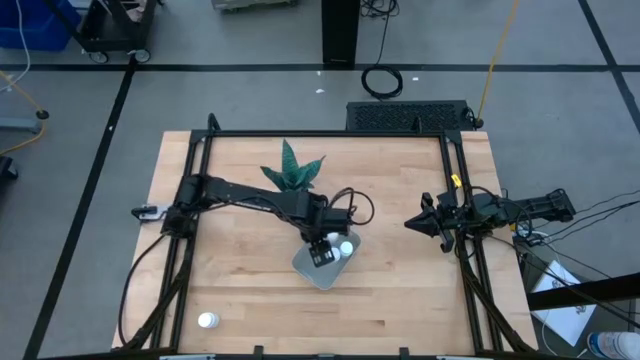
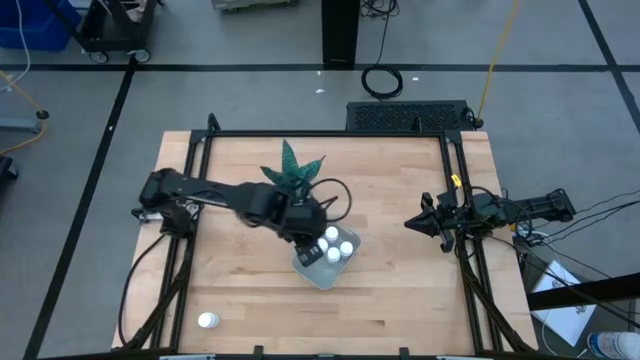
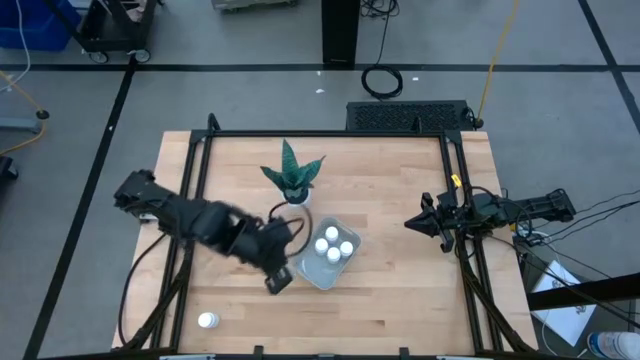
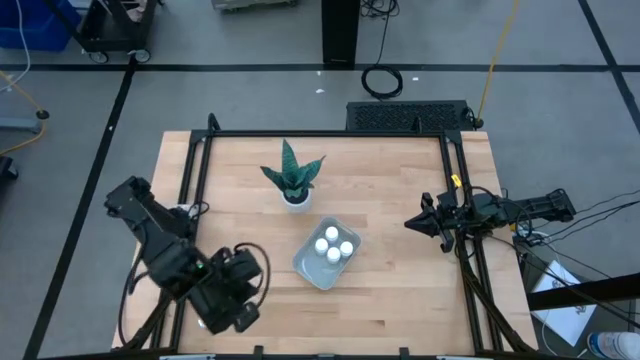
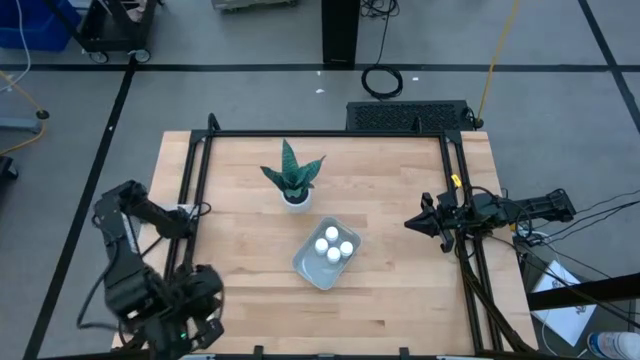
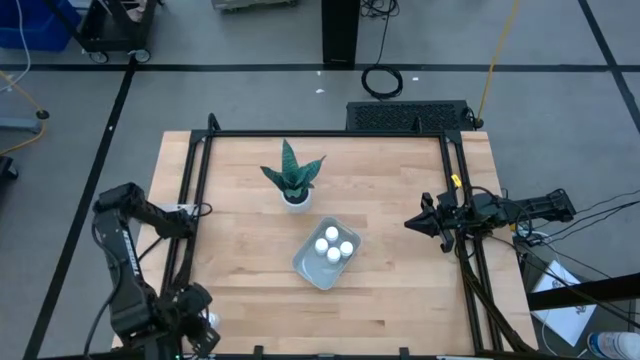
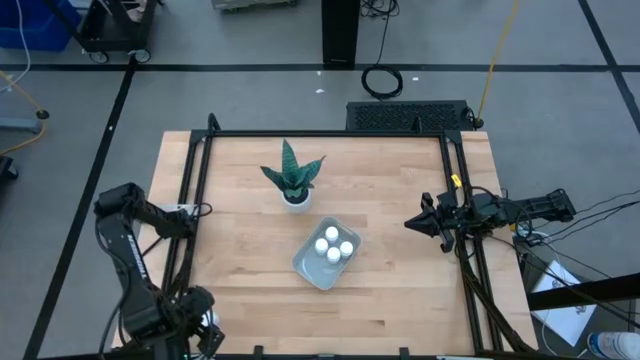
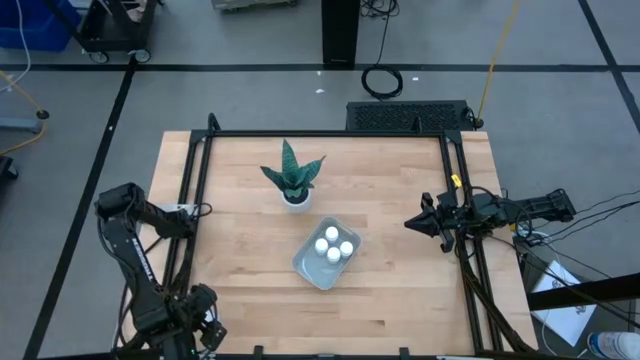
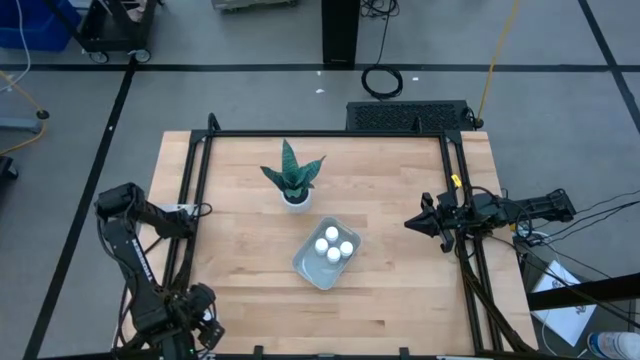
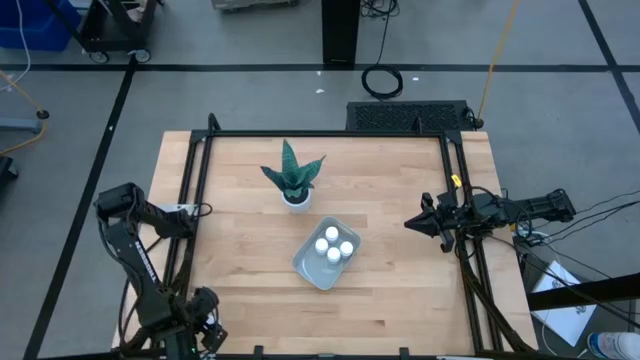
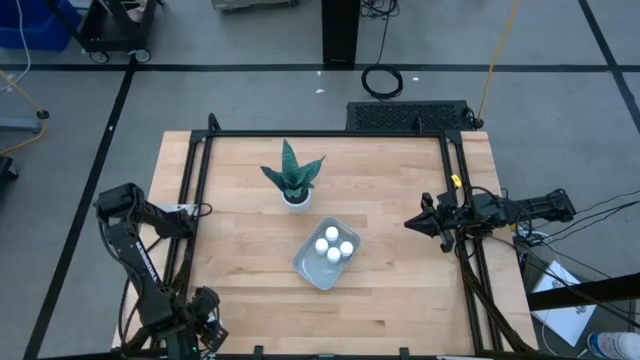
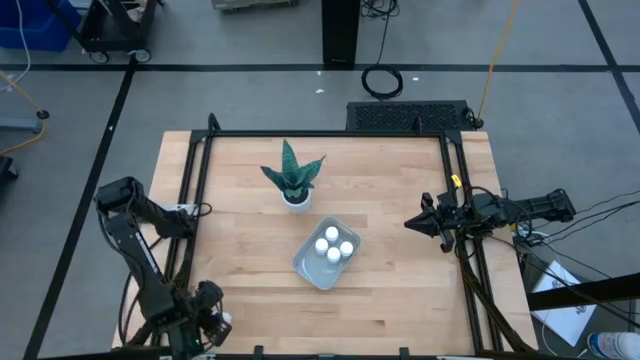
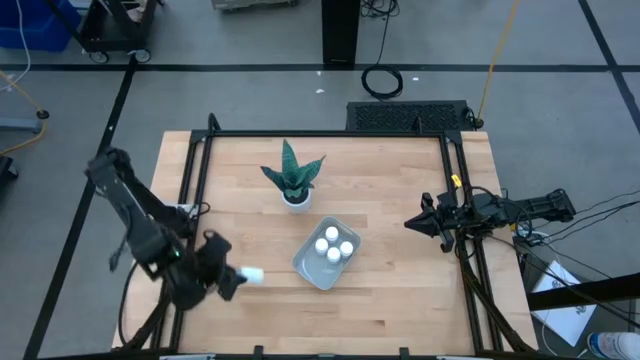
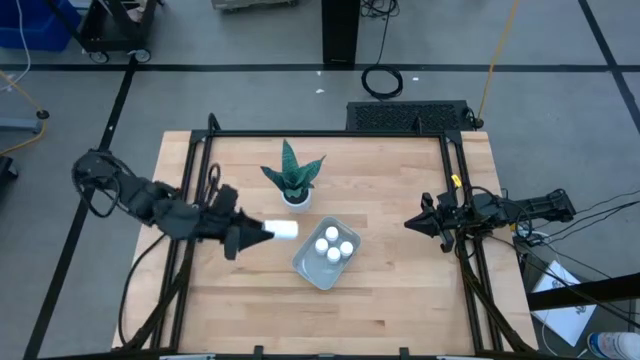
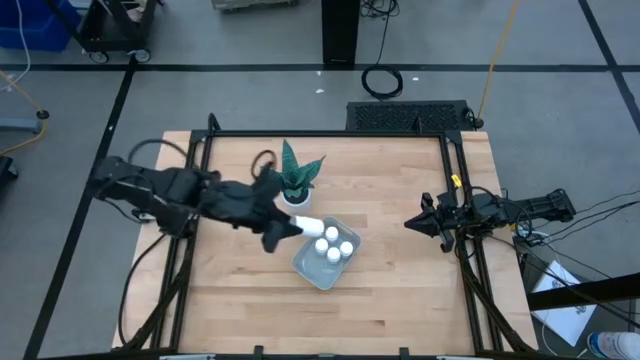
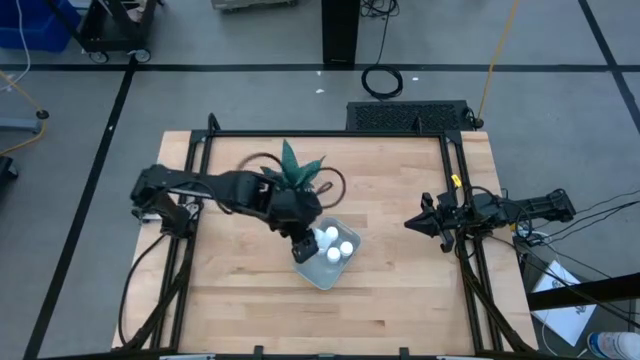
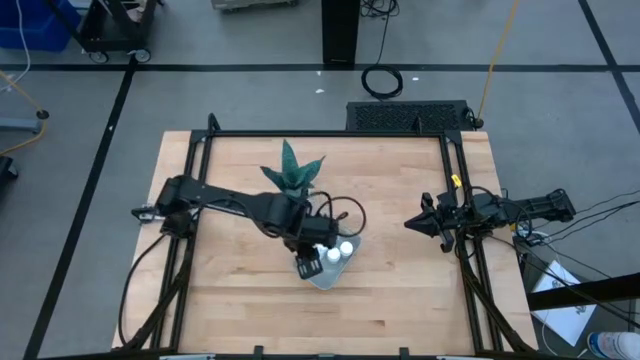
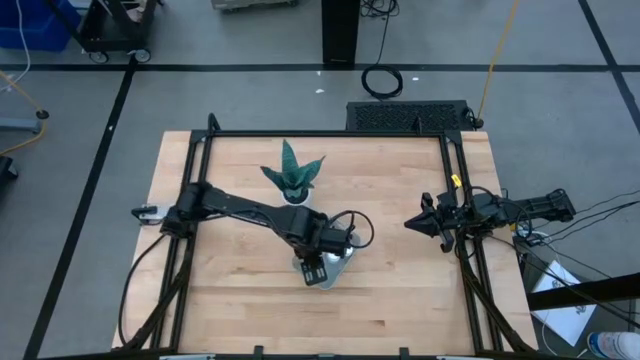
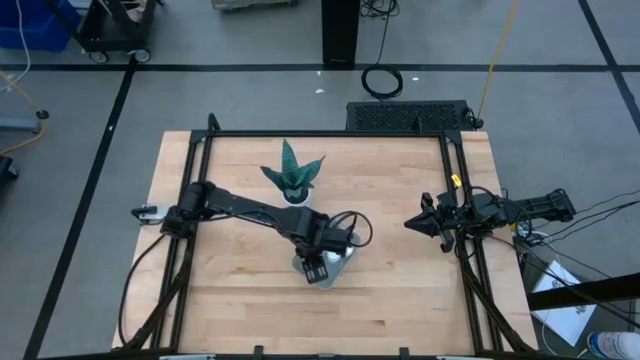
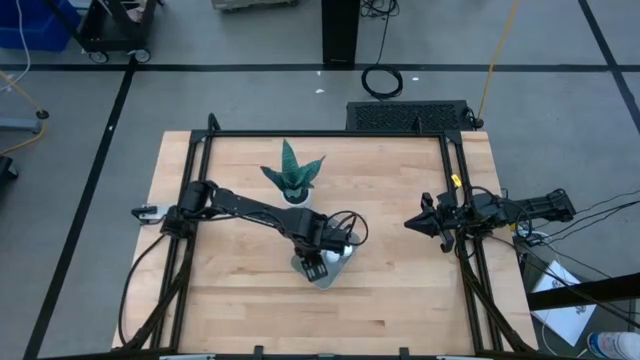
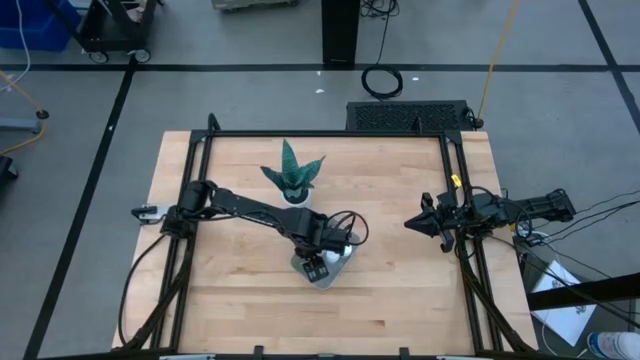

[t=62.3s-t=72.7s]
Task: Pick and place pill bottles into a basket
Put the white medicine bottle into the gray bin

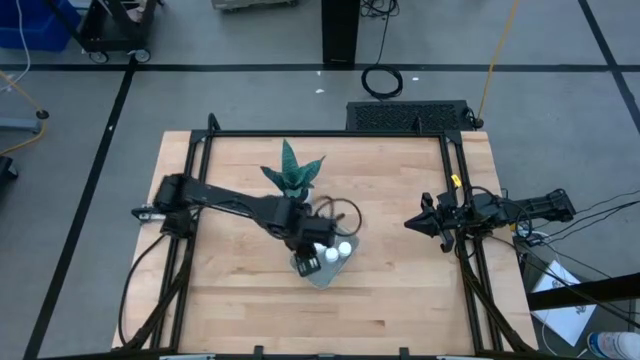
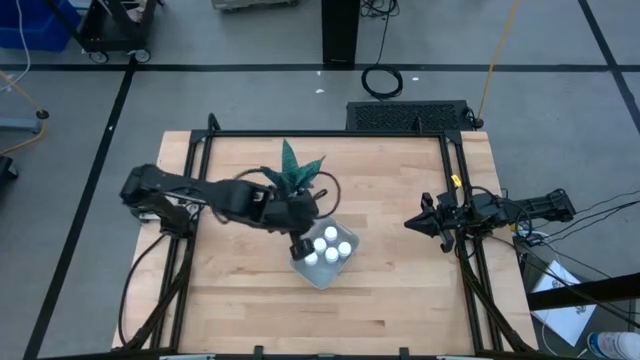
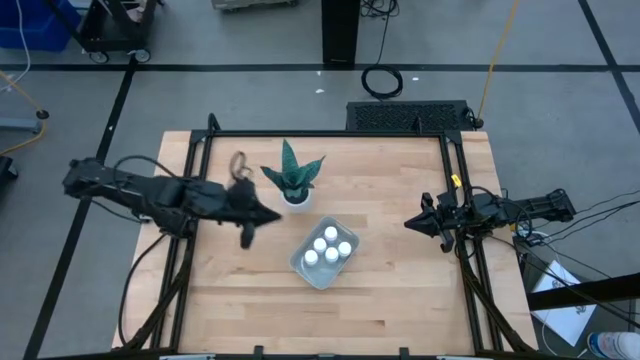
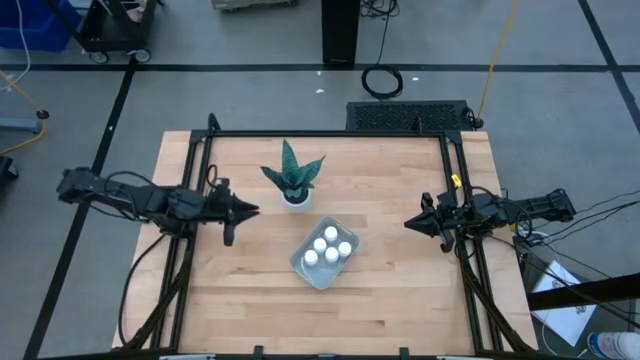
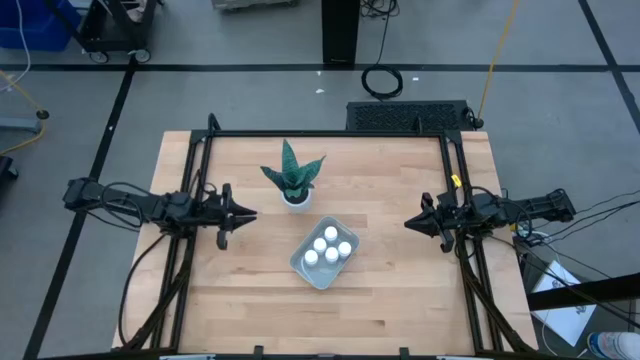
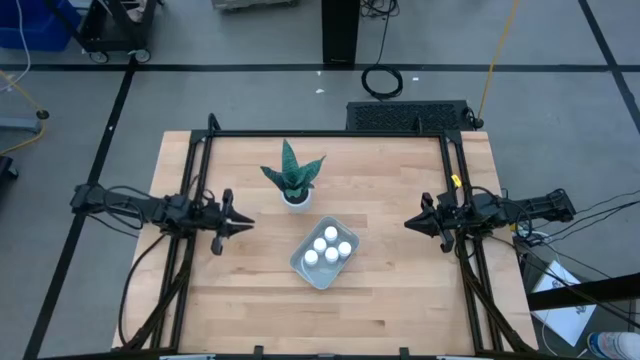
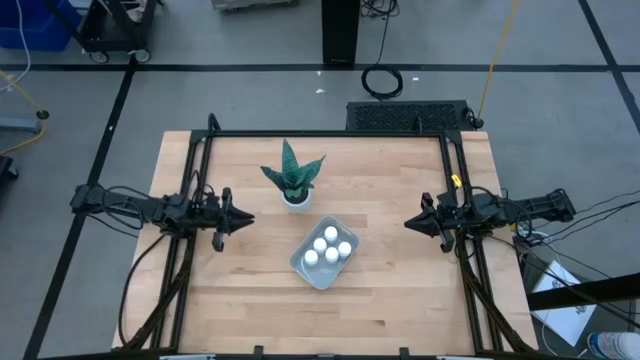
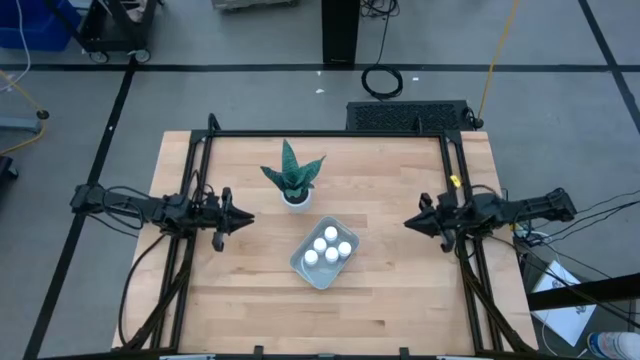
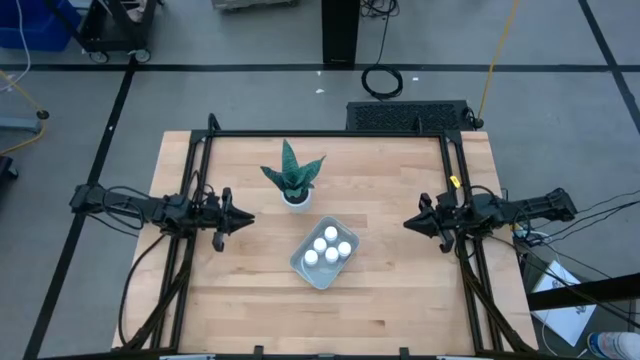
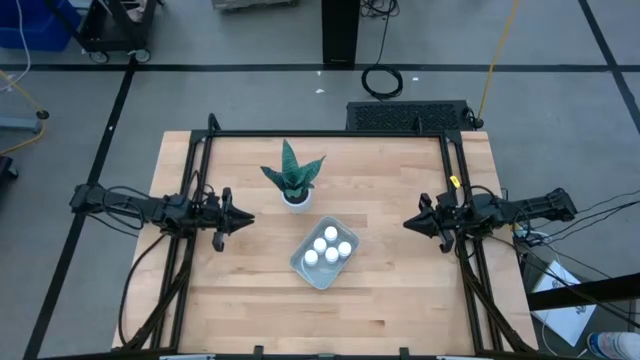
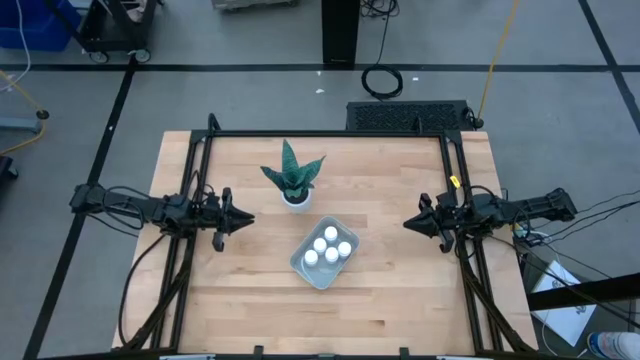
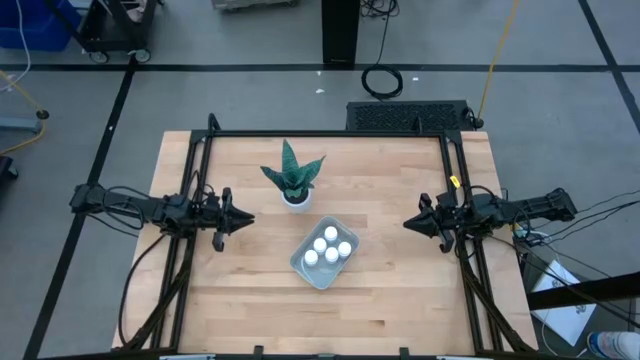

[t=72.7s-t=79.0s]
Return to Home Position

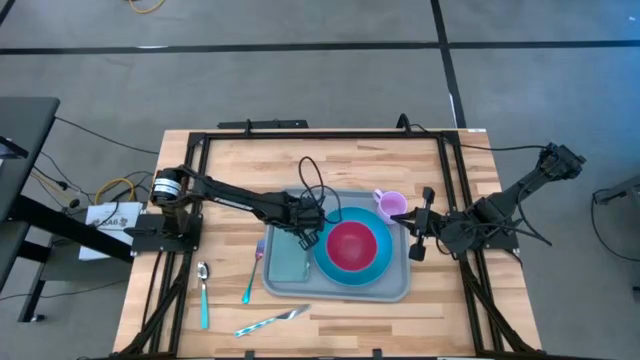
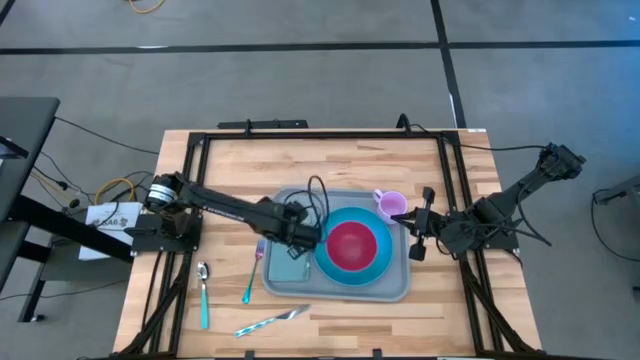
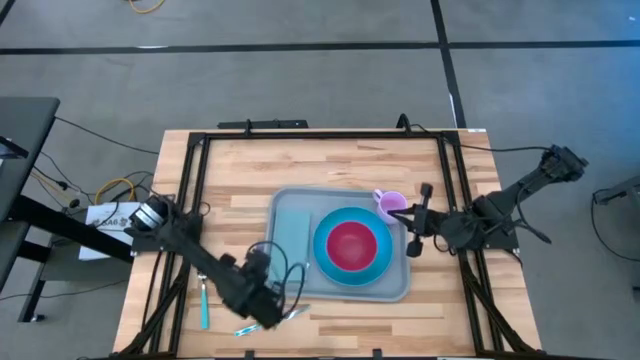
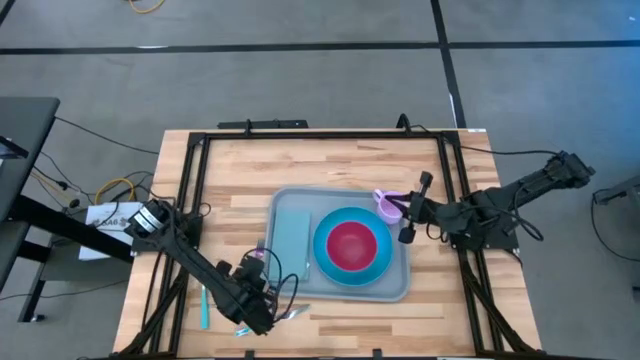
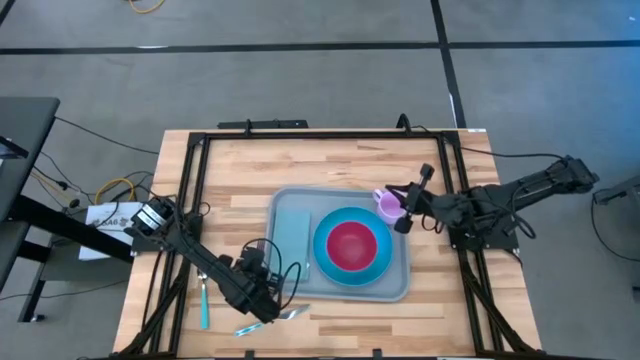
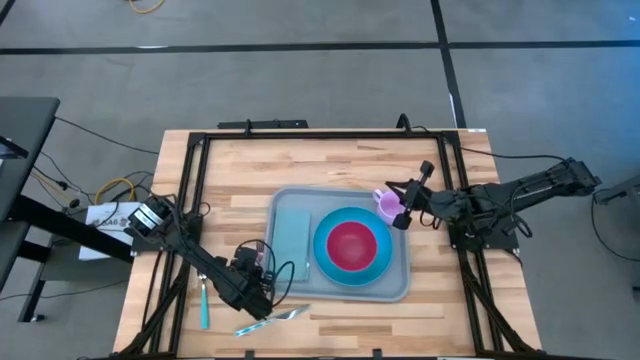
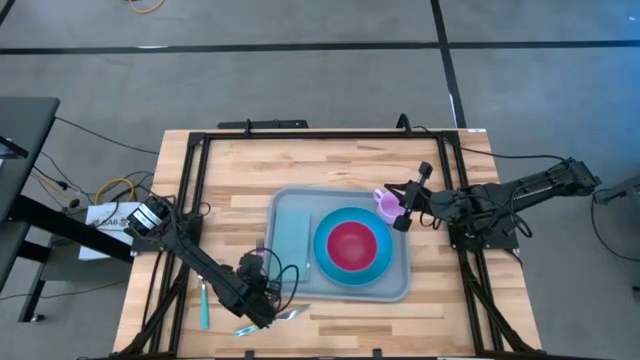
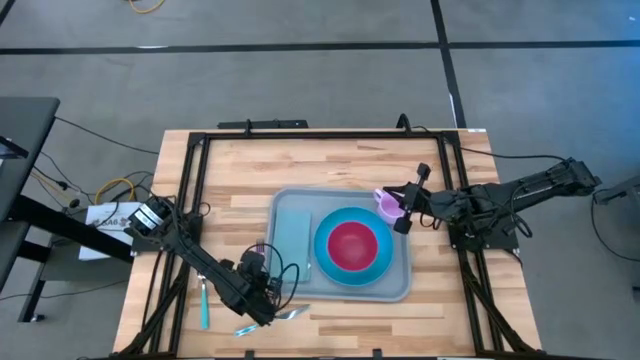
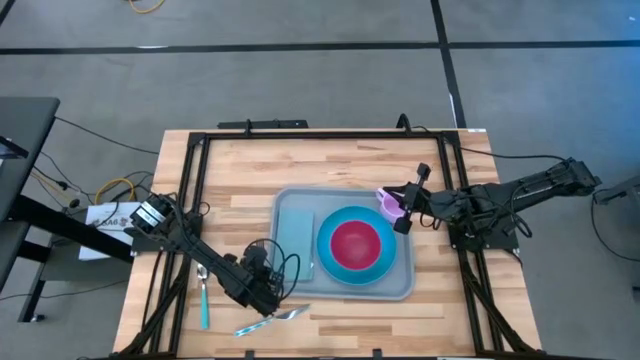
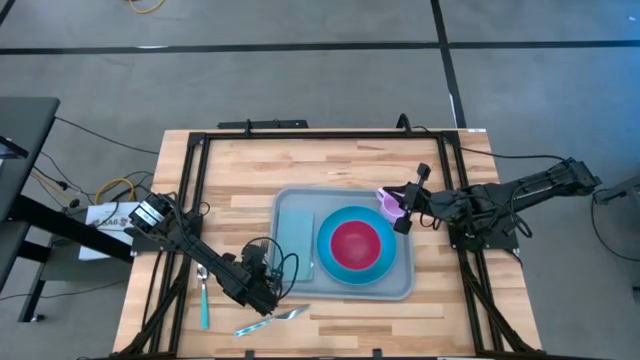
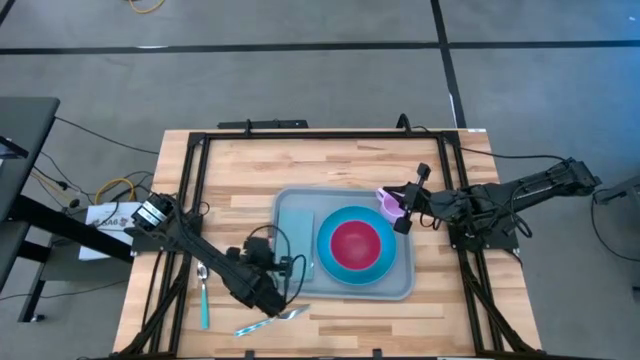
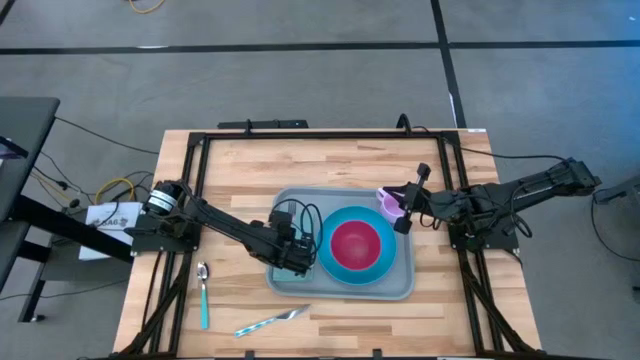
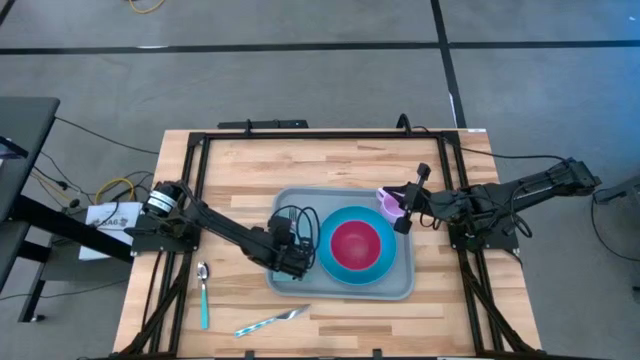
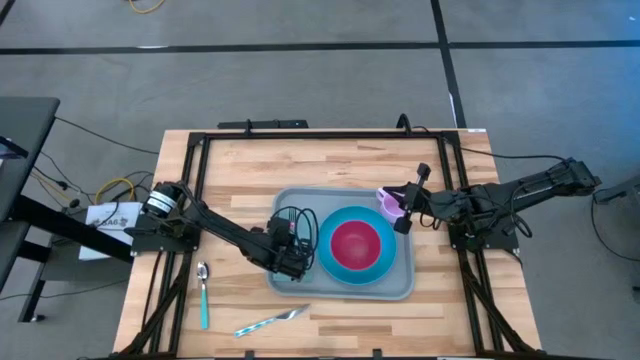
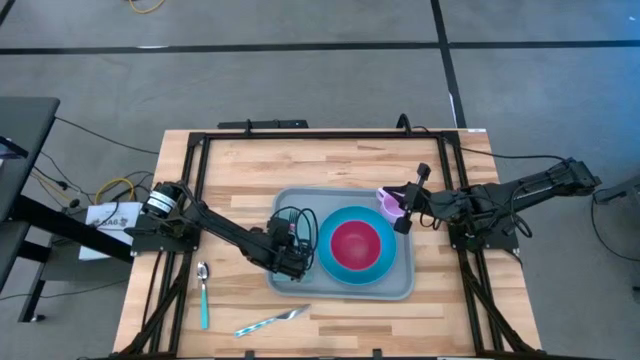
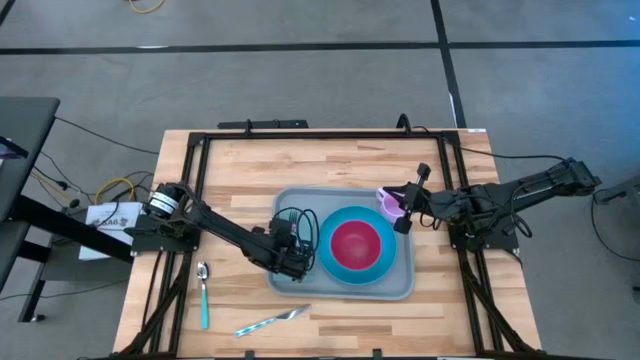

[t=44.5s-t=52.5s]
Task: Set up tray
Put the blue fork on top of the blue napkin on the gray serving tray
